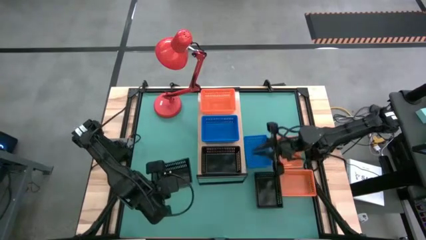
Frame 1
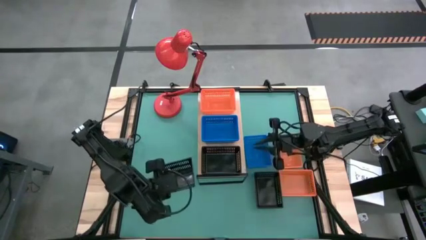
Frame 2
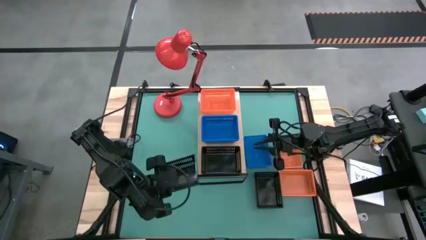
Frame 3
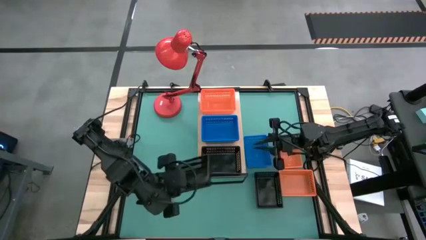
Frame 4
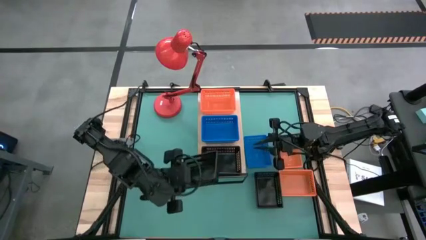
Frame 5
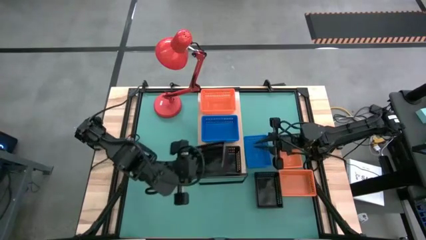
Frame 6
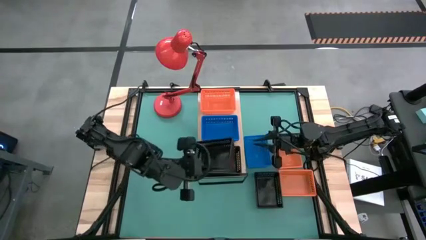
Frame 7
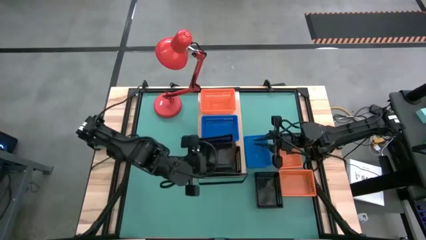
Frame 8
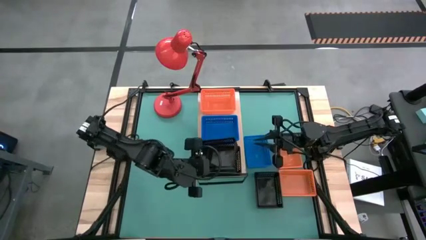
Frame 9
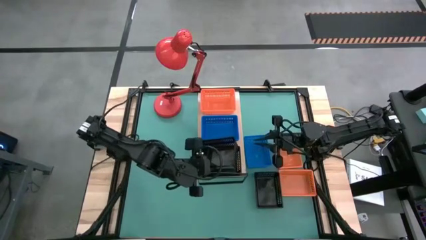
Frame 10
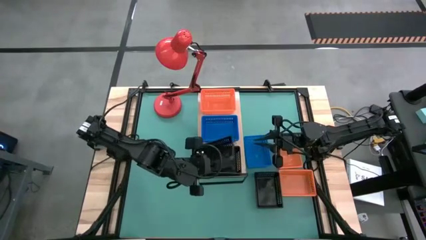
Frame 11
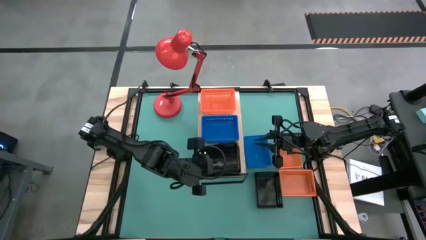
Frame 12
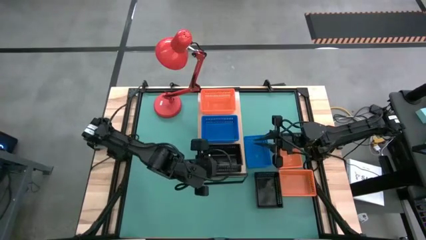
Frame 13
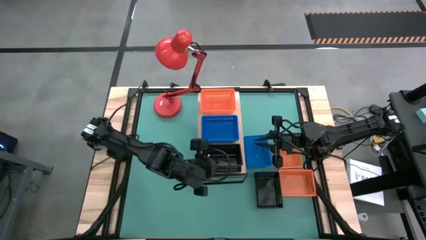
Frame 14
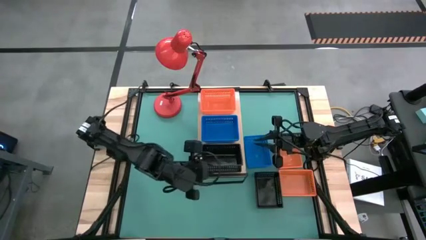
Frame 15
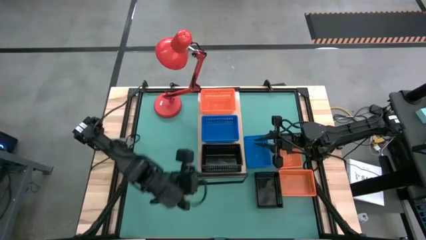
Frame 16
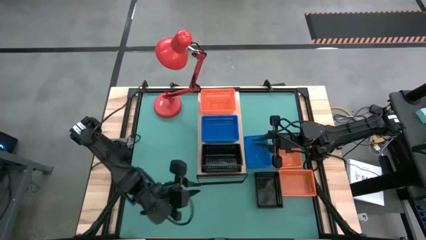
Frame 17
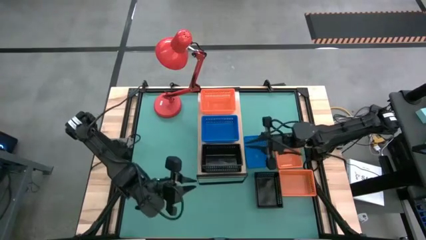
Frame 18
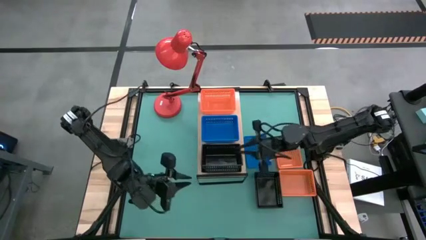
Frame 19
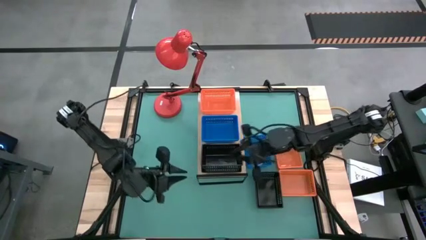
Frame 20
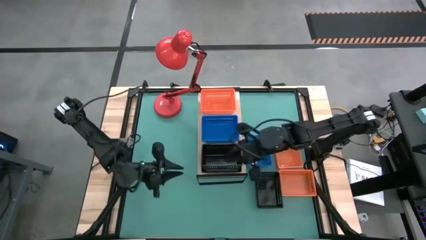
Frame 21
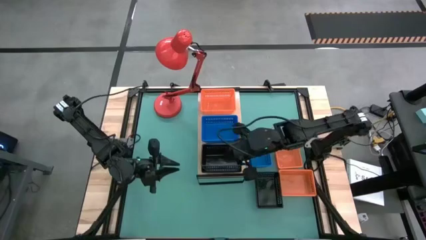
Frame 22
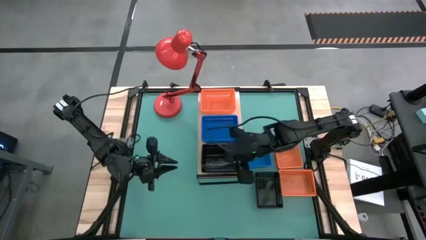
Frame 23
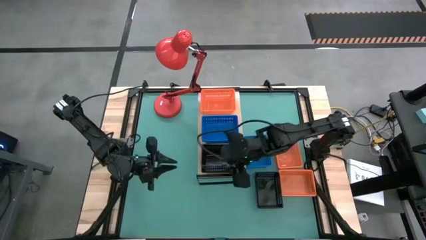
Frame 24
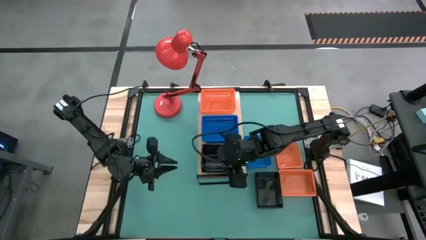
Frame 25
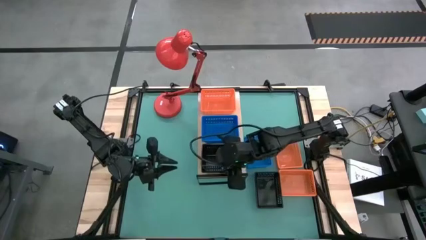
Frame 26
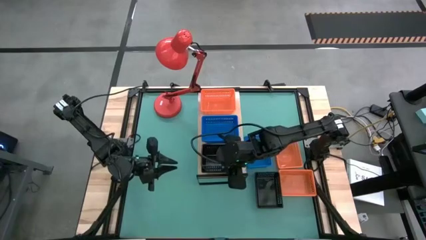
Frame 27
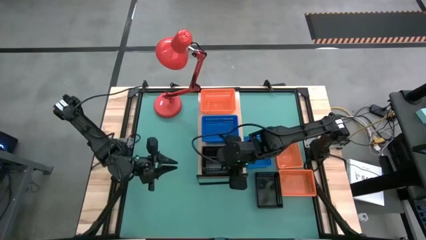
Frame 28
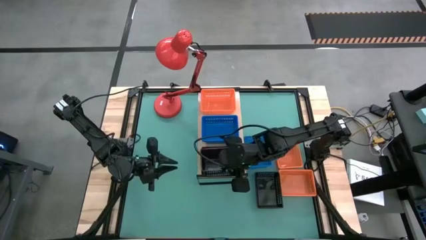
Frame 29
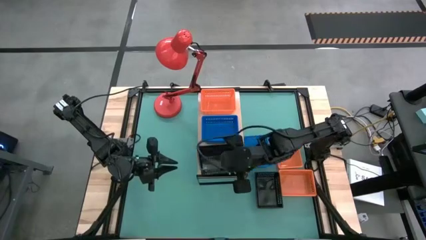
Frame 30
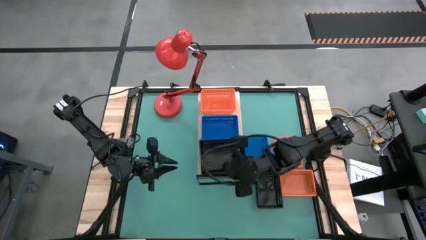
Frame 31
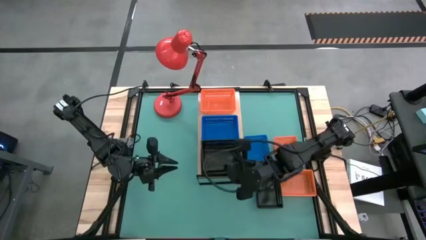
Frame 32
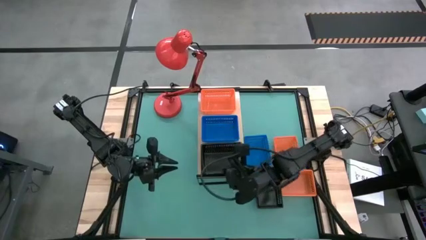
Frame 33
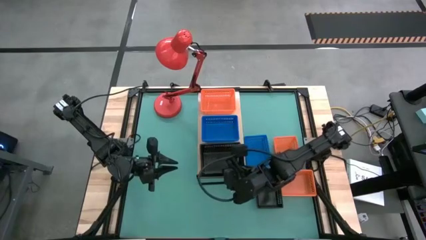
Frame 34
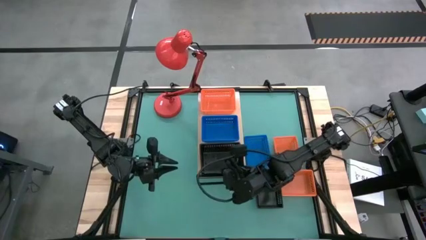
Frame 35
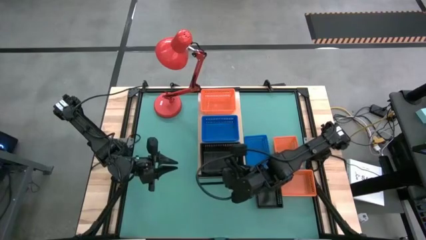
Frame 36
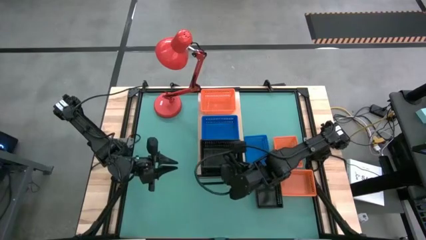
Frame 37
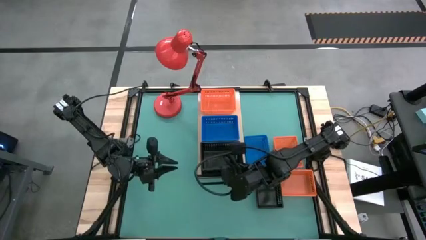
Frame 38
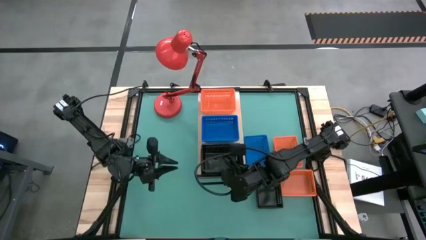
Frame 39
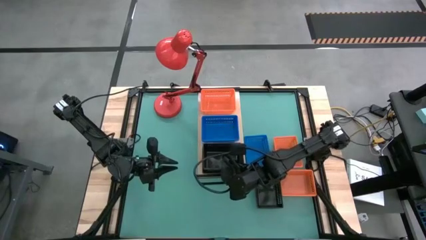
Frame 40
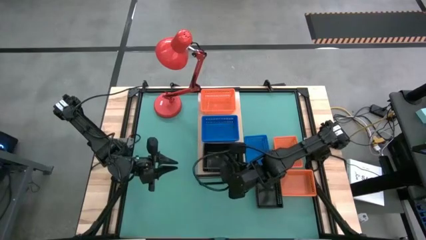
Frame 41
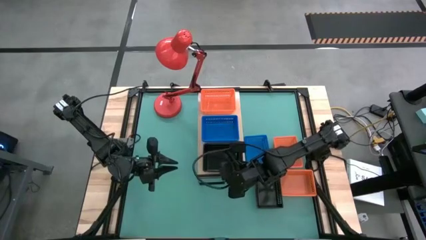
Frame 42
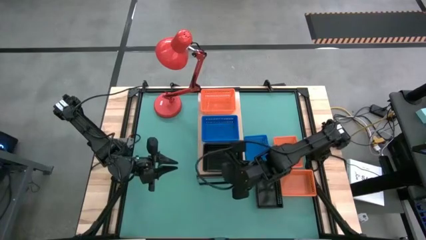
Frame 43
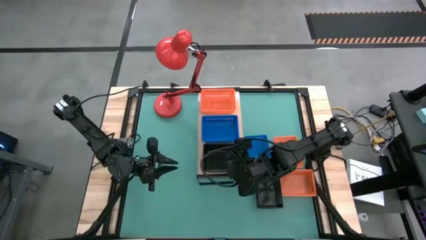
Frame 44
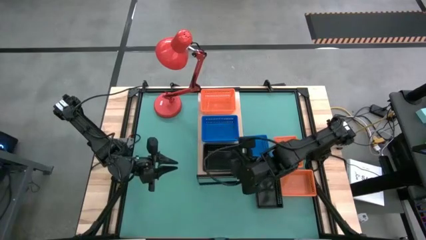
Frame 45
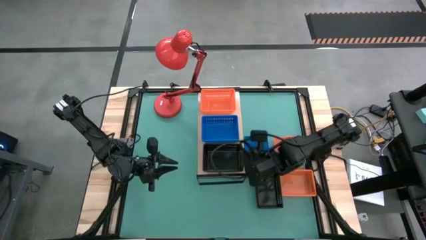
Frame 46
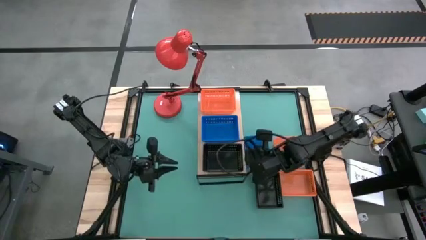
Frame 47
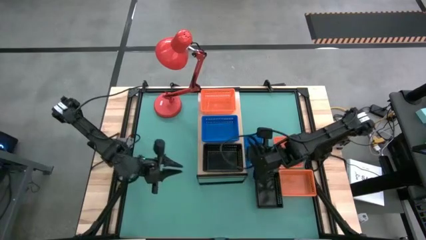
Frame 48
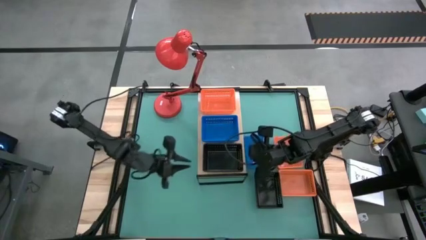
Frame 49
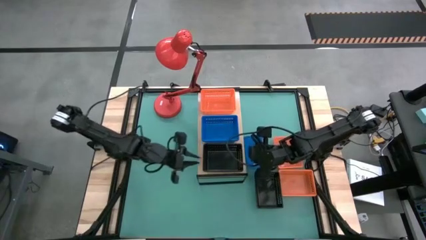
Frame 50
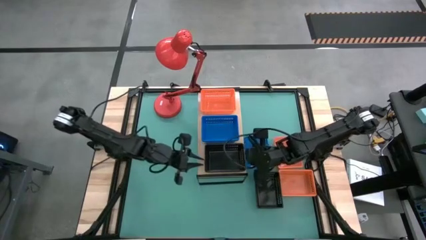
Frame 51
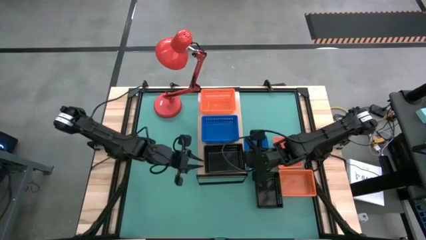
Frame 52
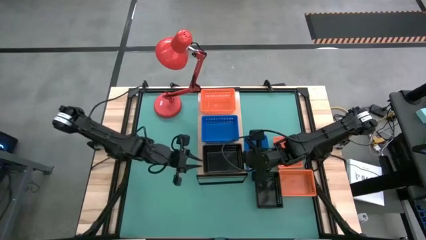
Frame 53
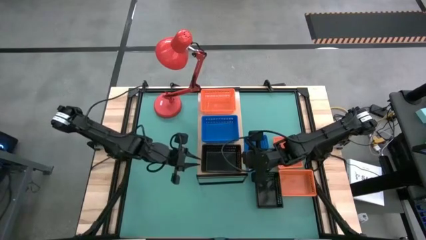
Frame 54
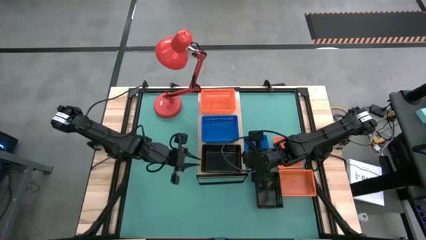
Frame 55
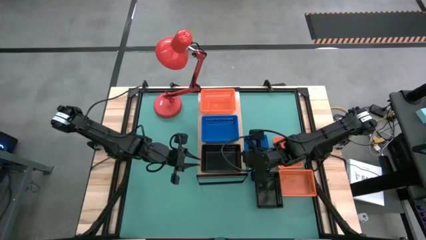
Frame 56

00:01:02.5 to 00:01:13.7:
Task: Stack baskets on shelf by color
Stack the left black bin on top of the black bin on the shelf

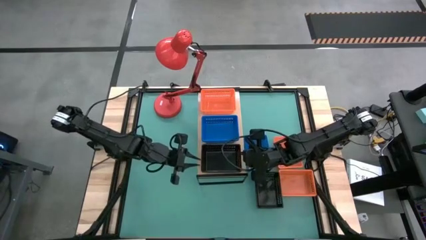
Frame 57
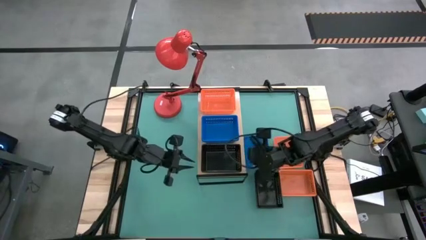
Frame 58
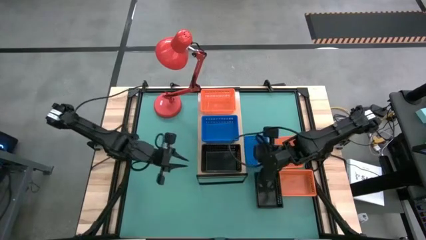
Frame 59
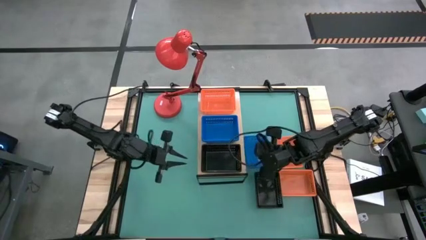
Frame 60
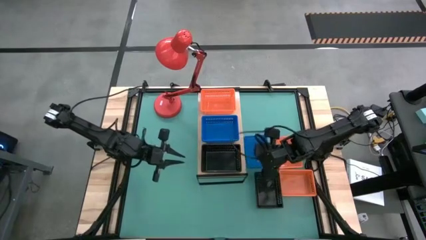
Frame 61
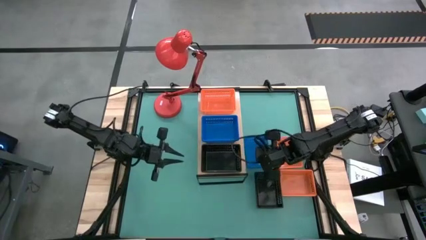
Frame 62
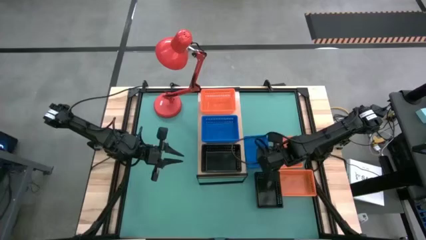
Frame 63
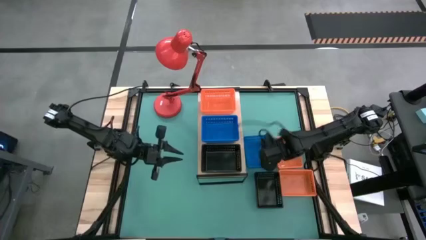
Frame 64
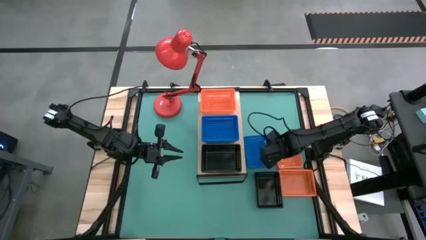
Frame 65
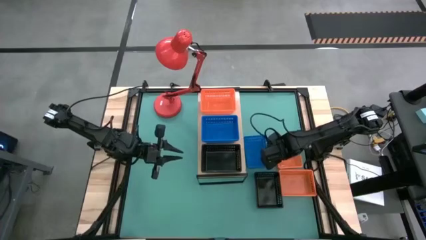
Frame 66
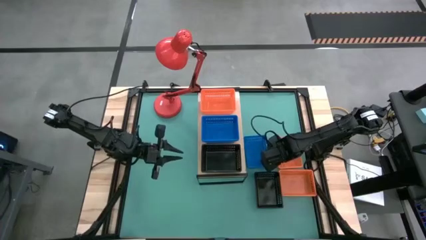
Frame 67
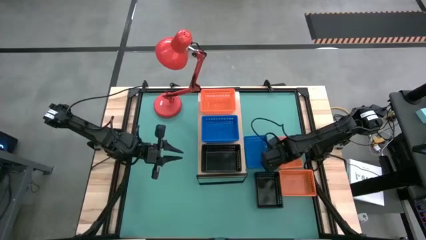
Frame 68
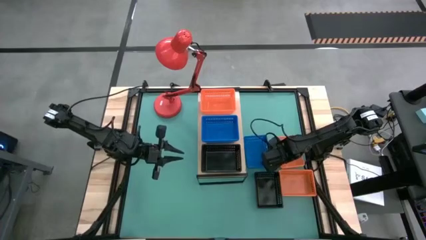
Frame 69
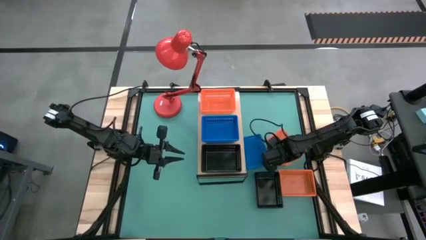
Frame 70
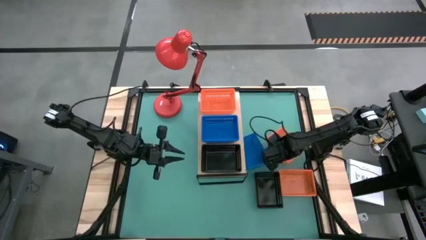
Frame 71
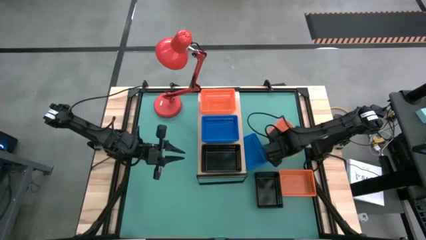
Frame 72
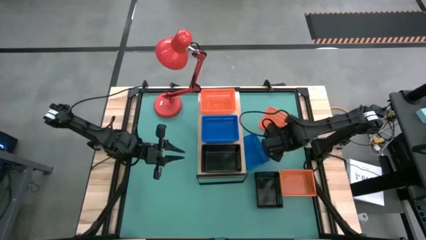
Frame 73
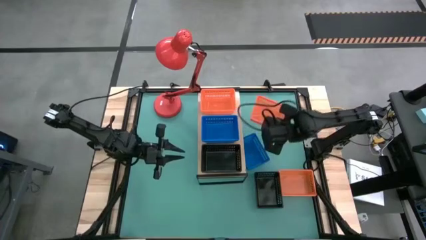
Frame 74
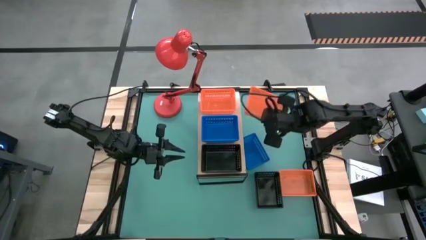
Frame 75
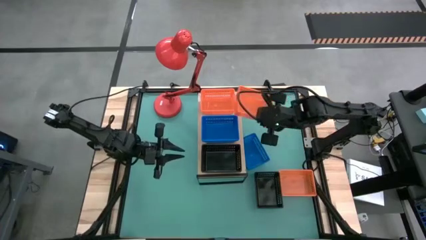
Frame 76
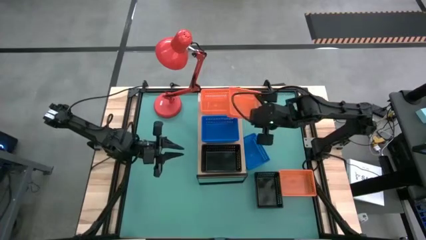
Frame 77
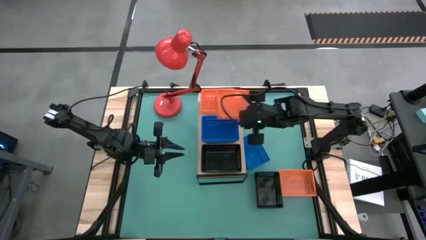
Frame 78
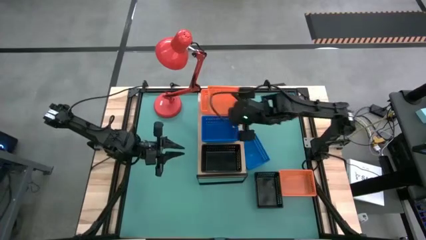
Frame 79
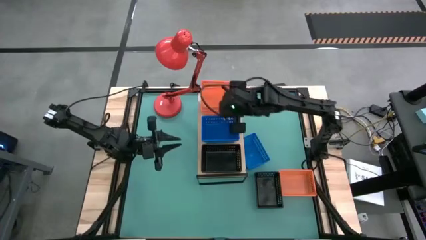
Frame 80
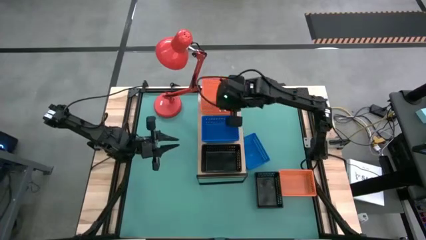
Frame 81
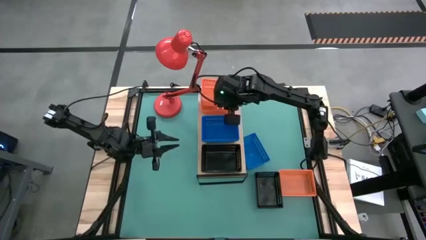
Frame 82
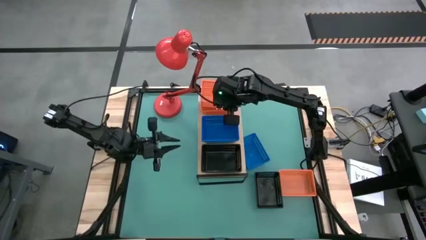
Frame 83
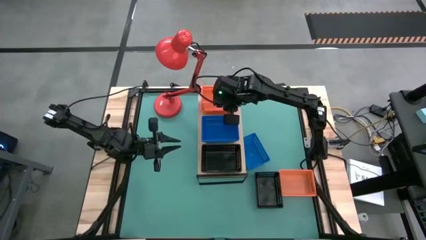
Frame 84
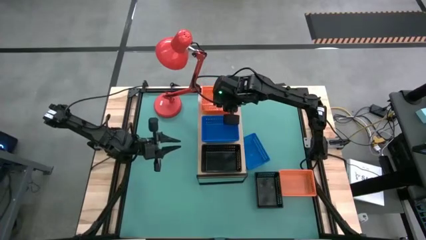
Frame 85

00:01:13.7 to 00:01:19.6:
Stack the top orange bin on top of the orange bin on the shelf

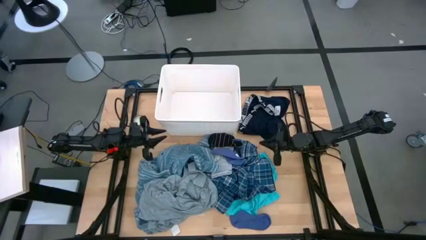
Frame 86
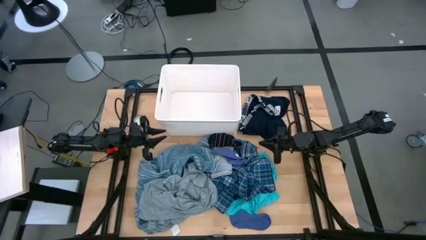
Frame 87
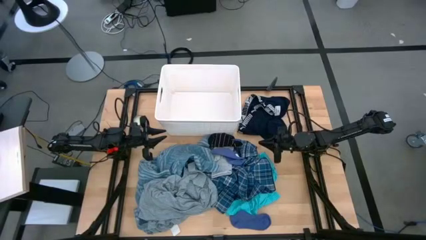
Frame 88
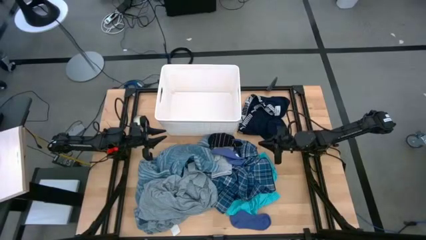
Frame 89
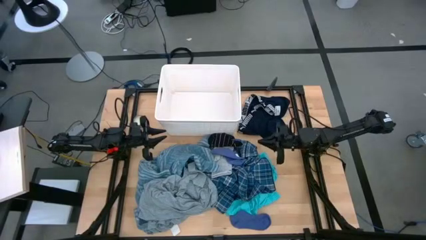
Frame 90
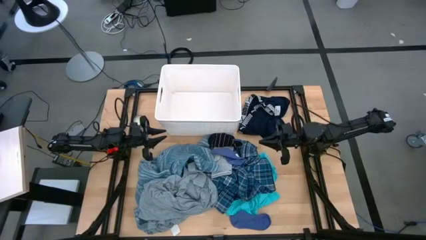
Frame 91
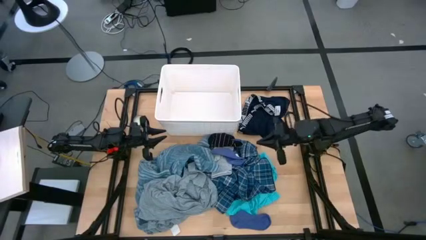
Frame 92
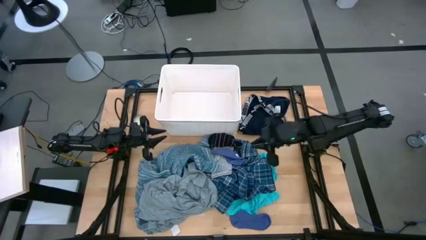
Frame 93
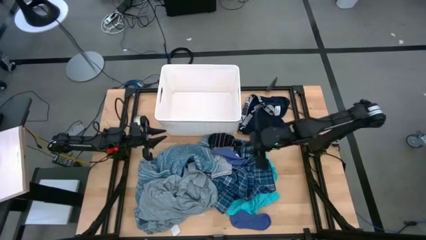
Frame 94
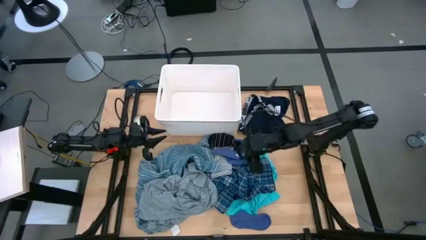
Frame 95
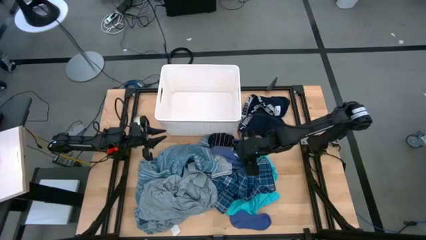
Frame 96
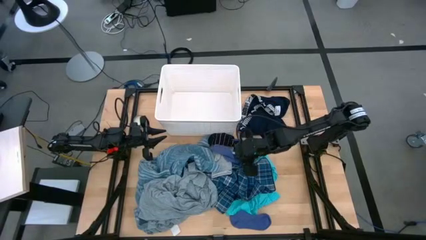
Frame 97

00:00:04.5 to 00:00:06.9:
Task: Sort clothes
Put the blue sock into the white laundry bin
